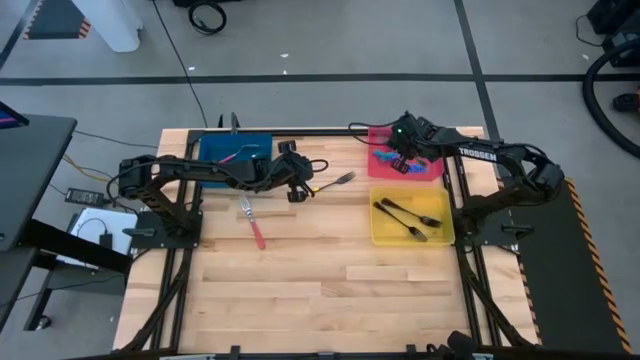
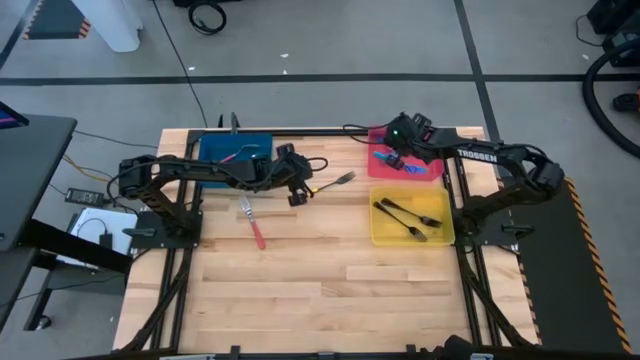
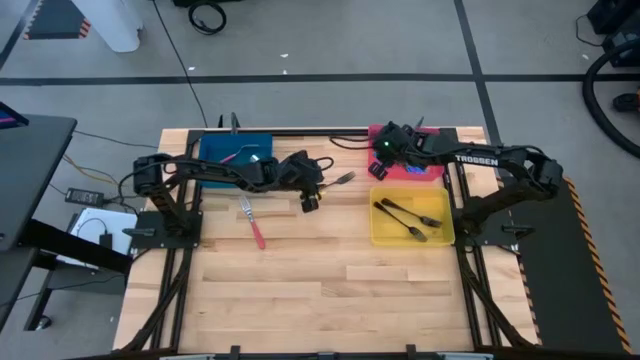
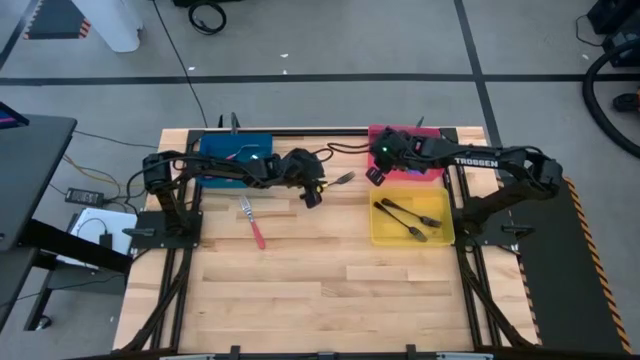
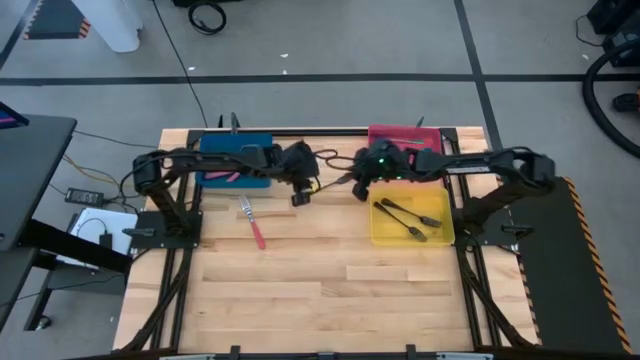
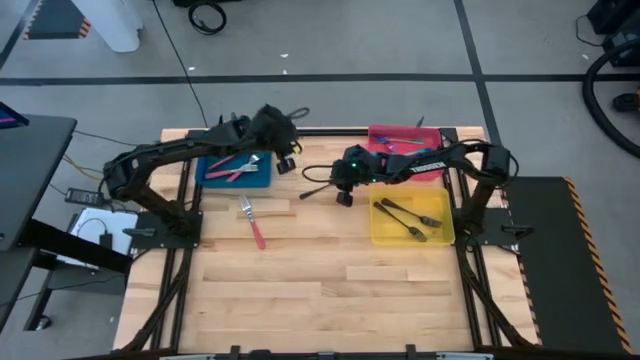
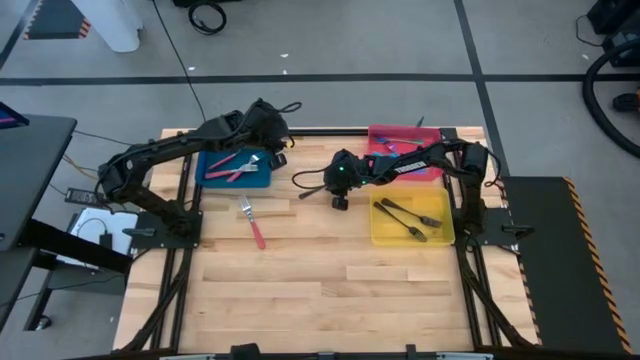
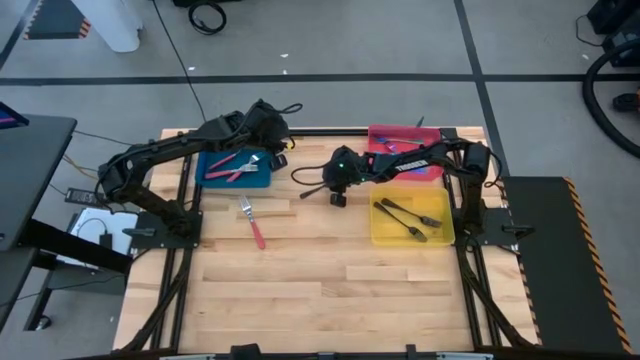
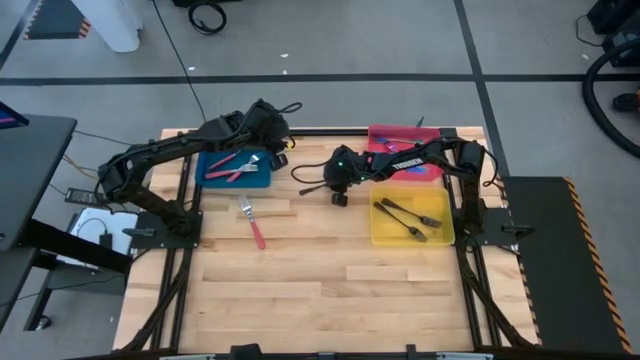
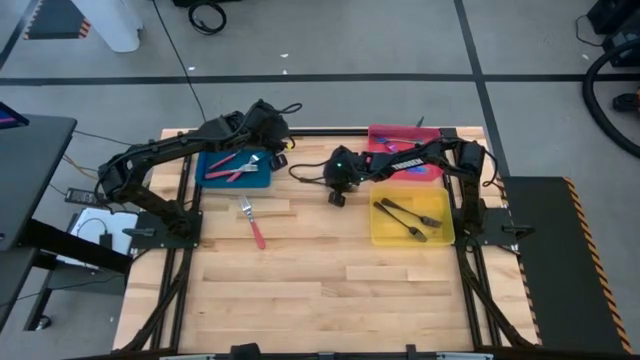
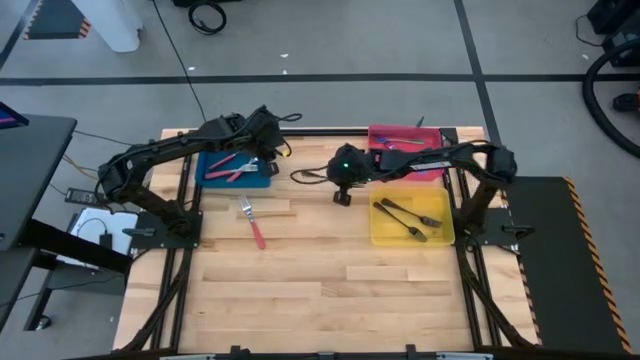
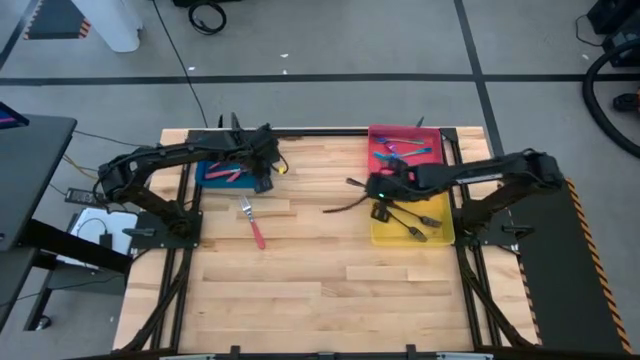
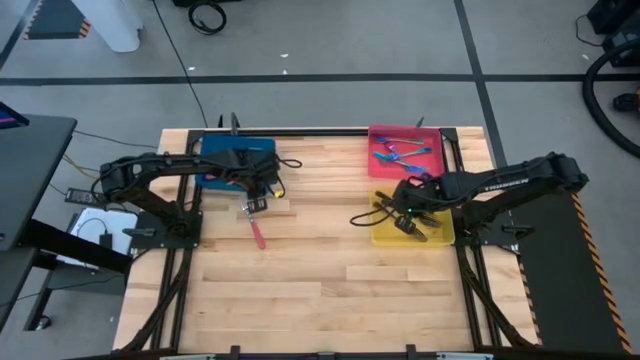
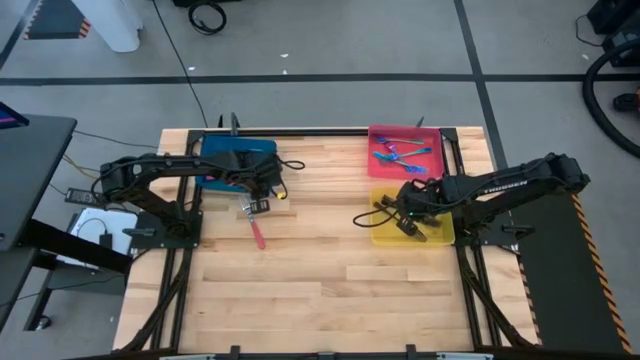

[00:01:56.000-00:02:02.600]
Task: Sort silverware by color (type)
Put the black fork into the yellow bin

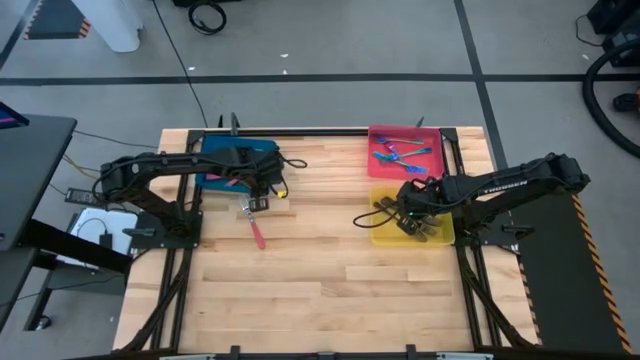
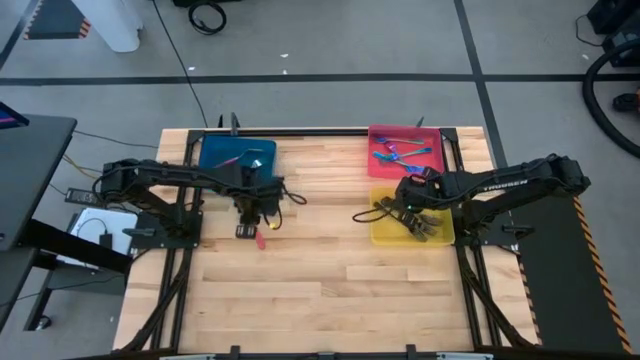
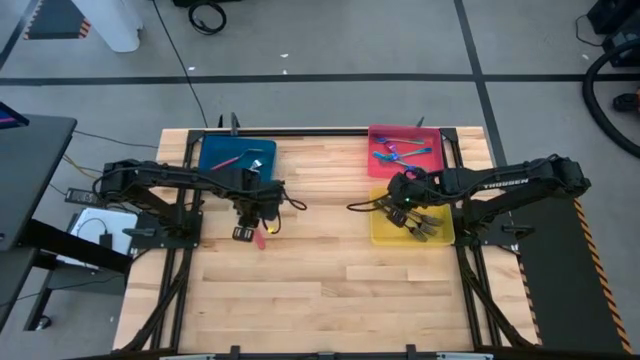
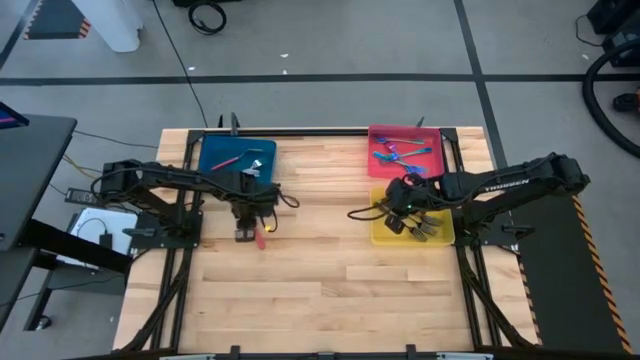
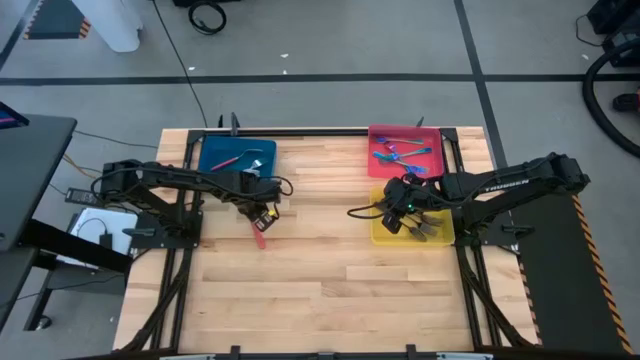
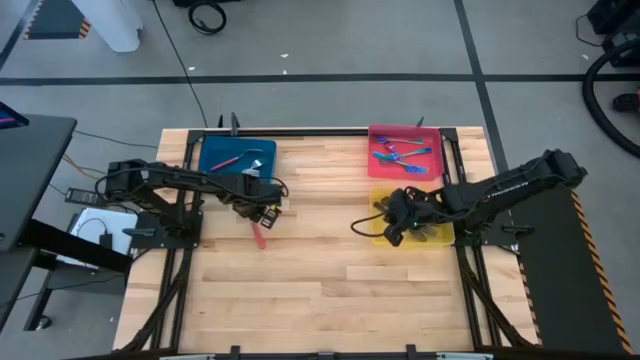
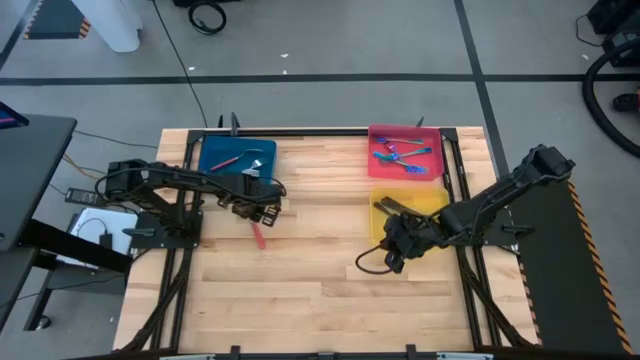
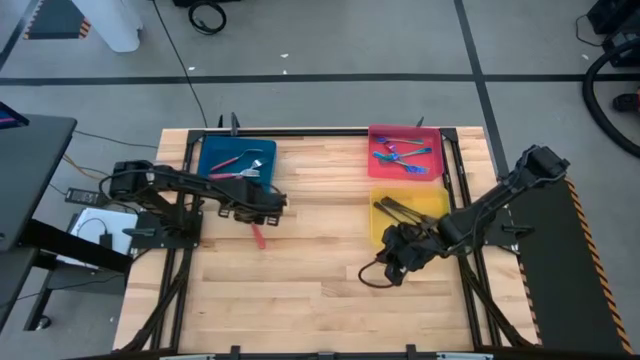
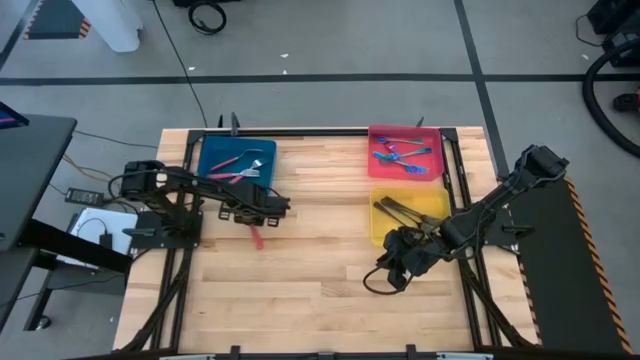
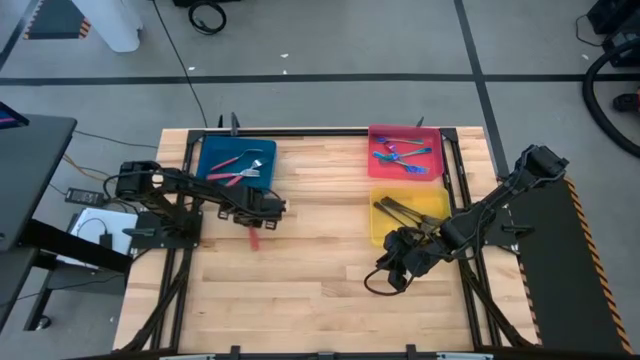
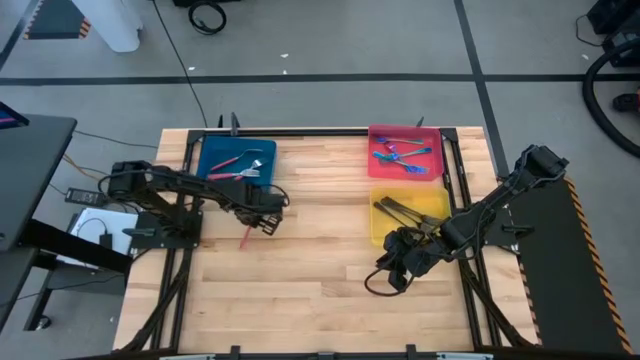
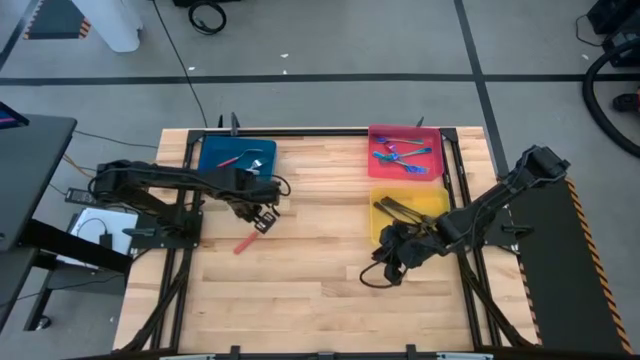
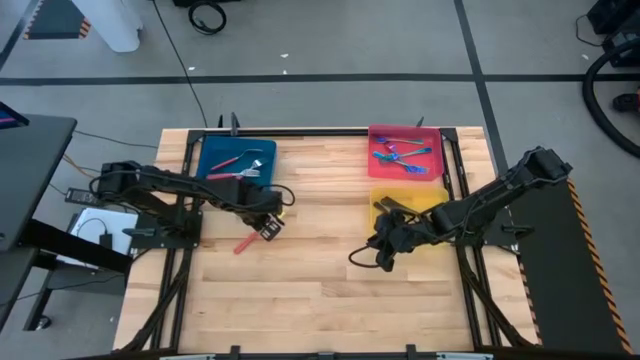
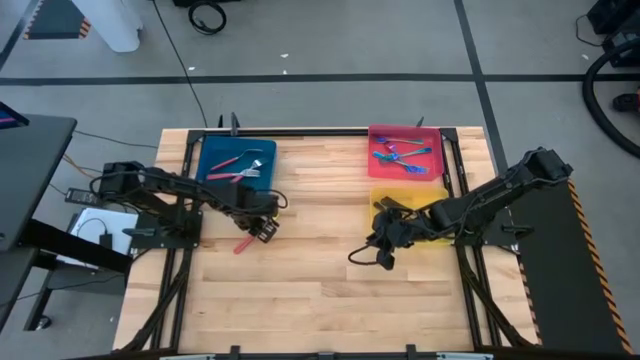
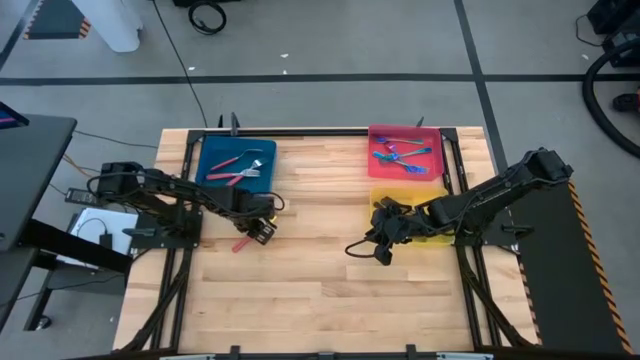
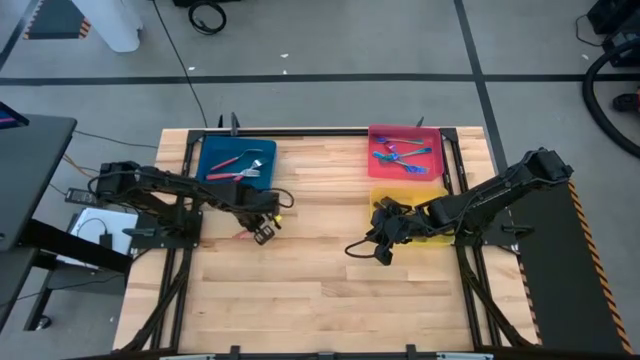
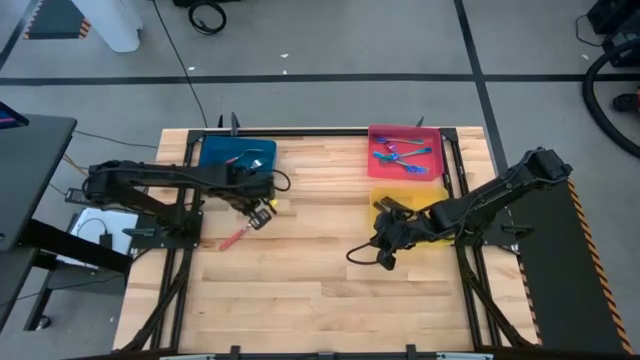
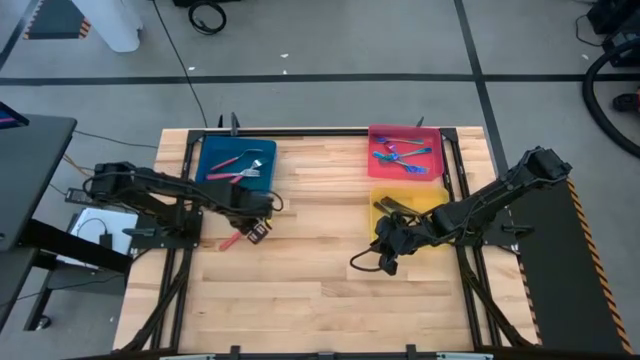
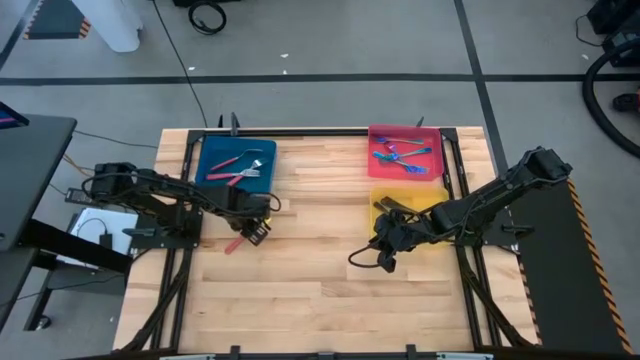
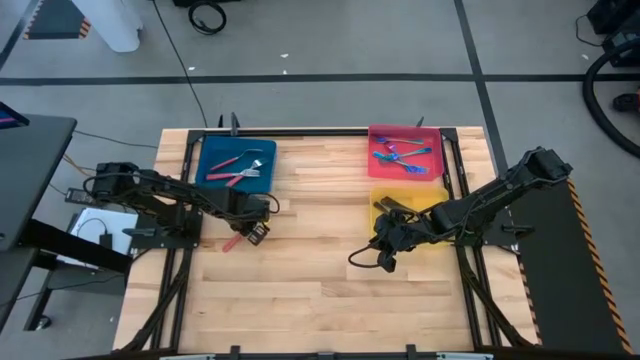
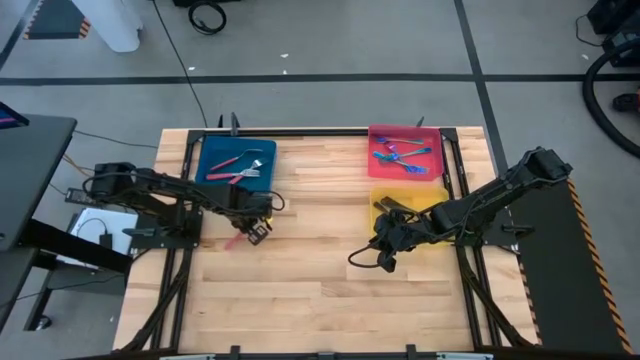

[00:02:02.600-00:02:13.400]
Put the red fork into the blue bin

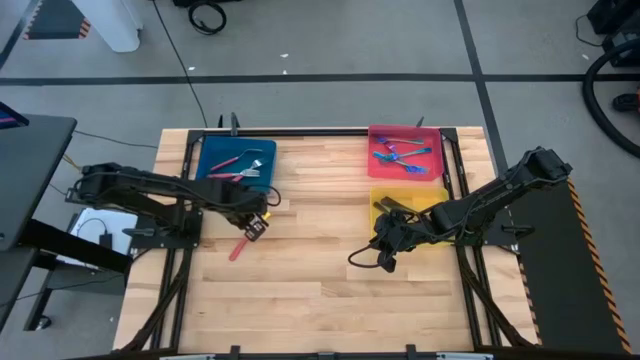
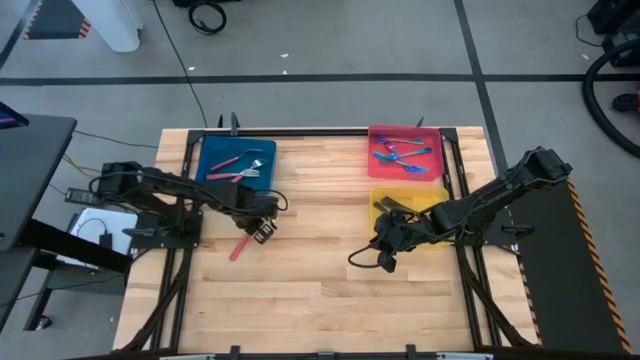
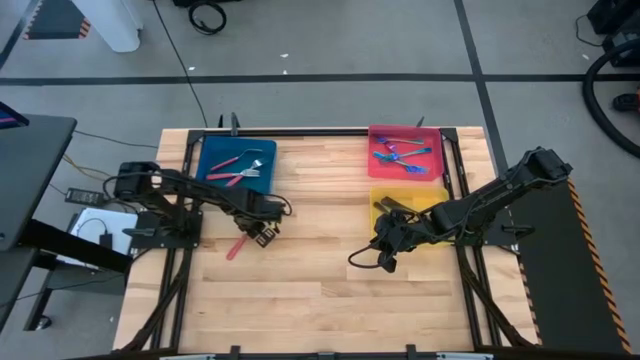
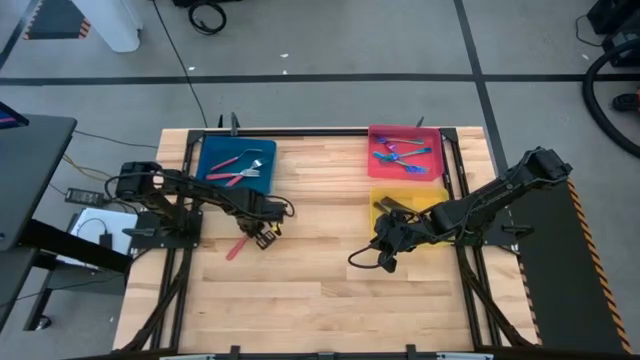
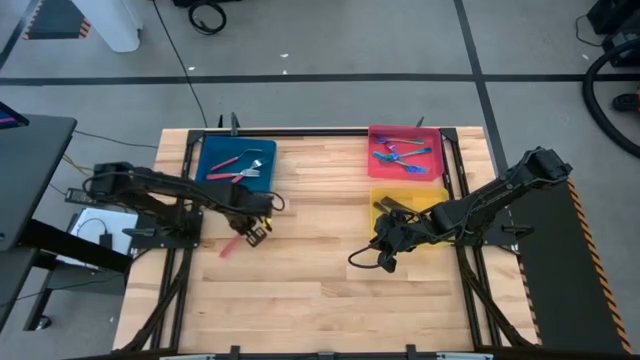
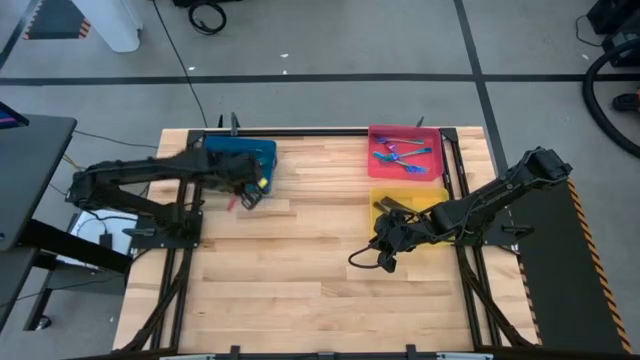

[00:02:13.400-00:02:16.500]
Put the red fork into the blue bin
